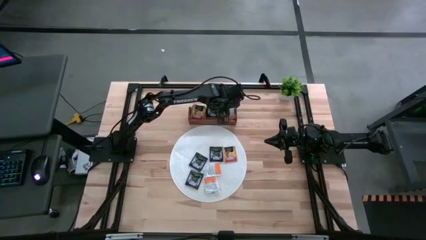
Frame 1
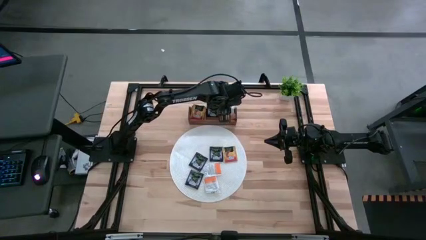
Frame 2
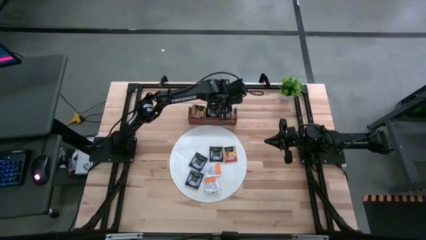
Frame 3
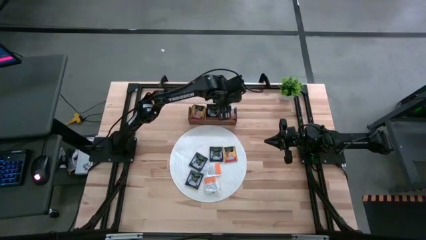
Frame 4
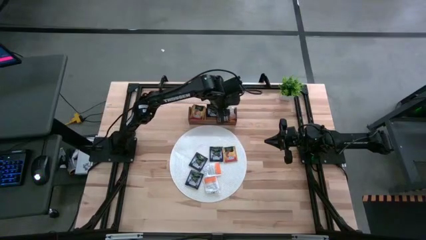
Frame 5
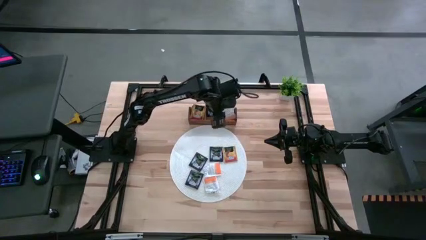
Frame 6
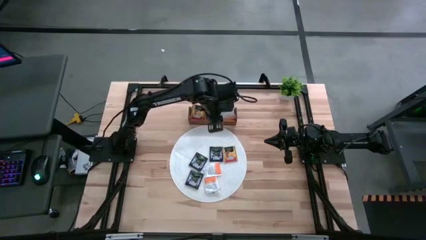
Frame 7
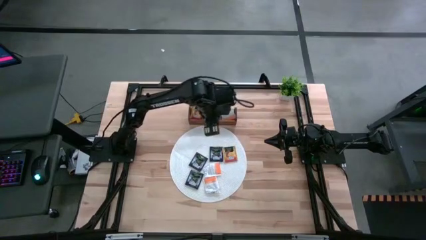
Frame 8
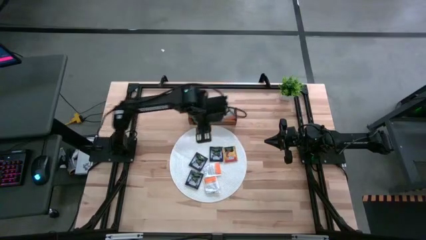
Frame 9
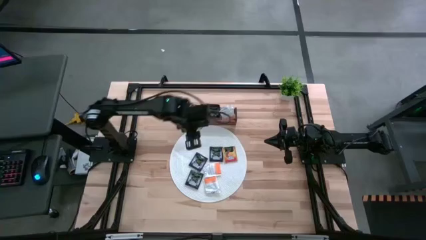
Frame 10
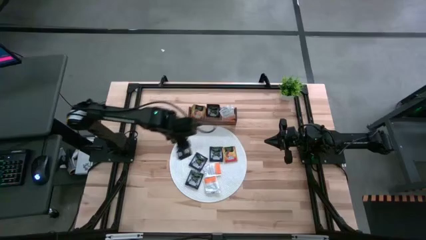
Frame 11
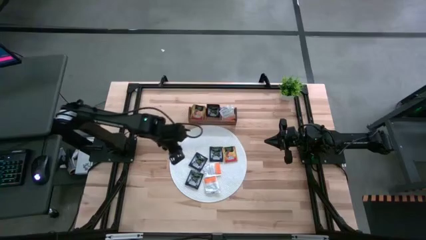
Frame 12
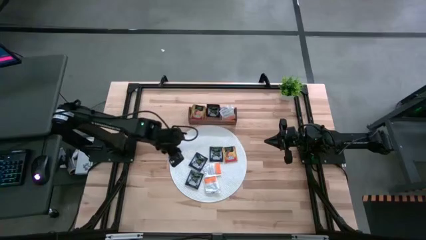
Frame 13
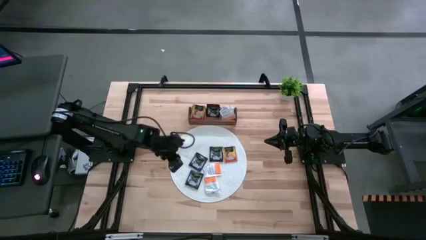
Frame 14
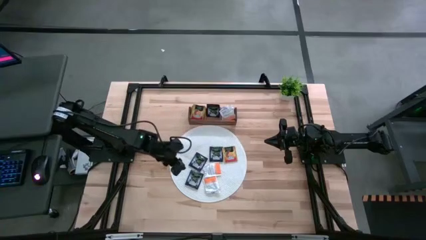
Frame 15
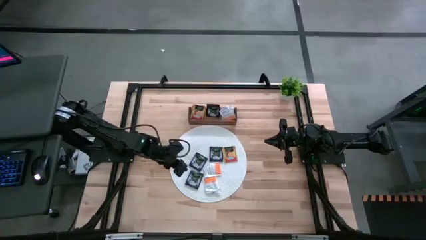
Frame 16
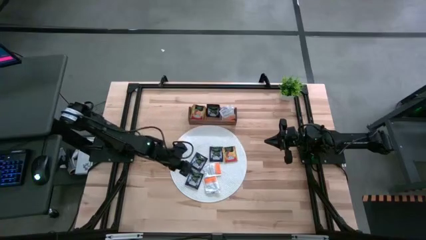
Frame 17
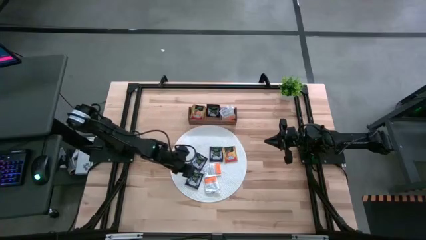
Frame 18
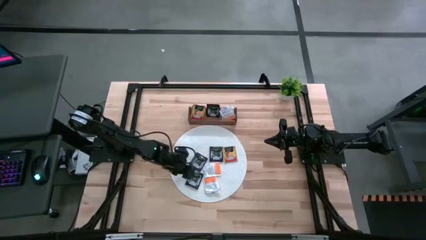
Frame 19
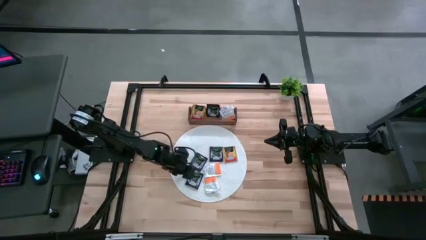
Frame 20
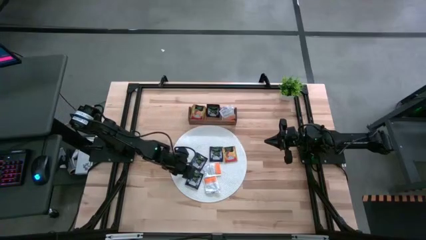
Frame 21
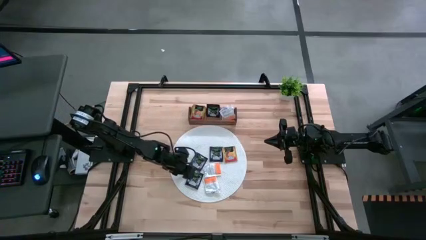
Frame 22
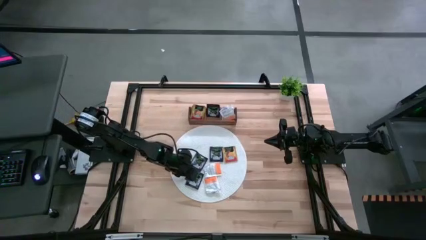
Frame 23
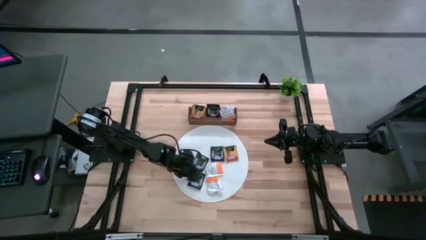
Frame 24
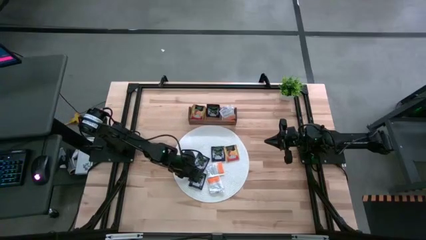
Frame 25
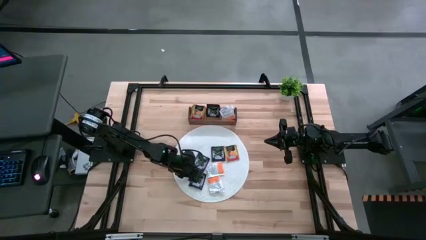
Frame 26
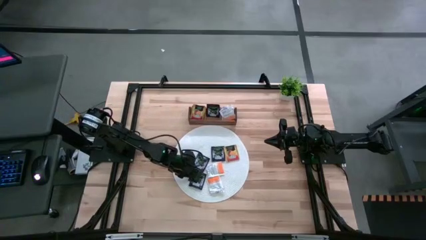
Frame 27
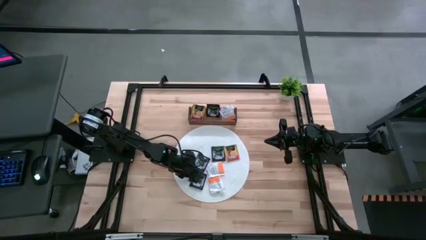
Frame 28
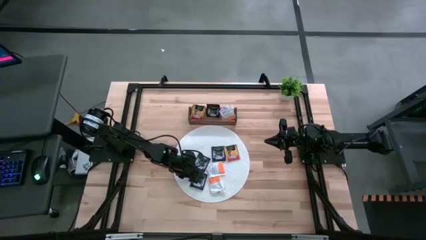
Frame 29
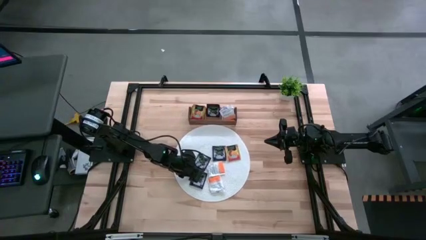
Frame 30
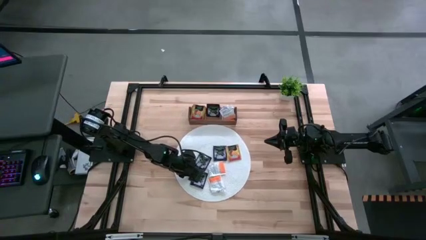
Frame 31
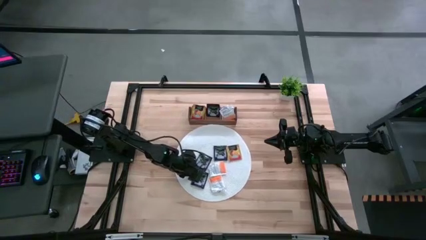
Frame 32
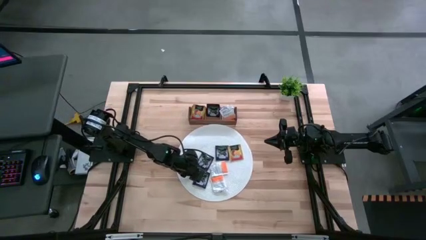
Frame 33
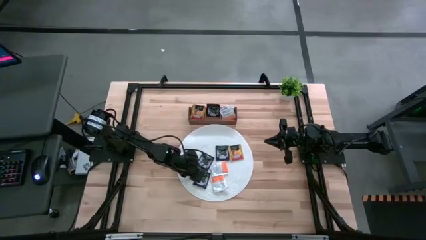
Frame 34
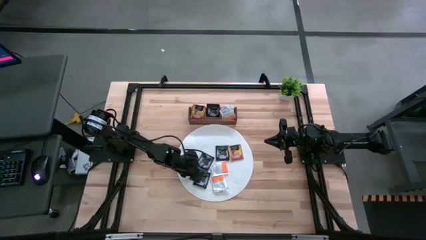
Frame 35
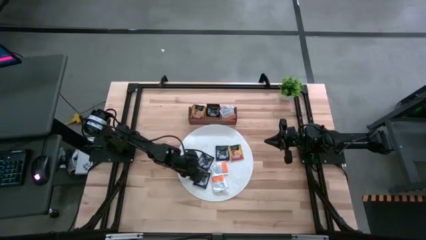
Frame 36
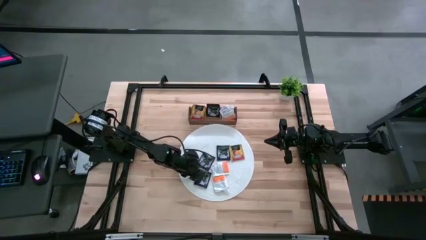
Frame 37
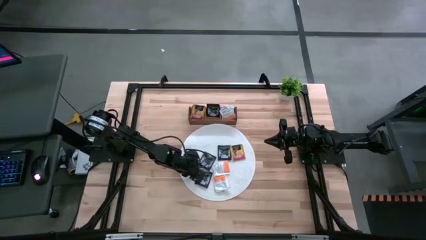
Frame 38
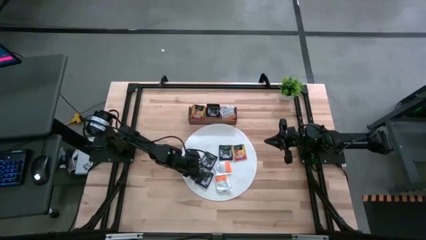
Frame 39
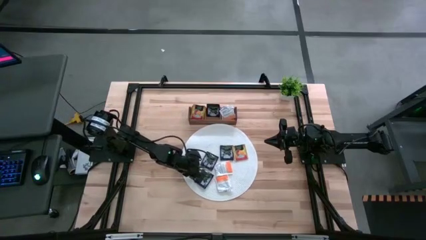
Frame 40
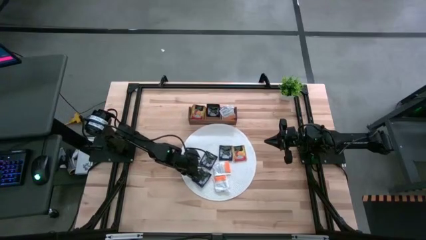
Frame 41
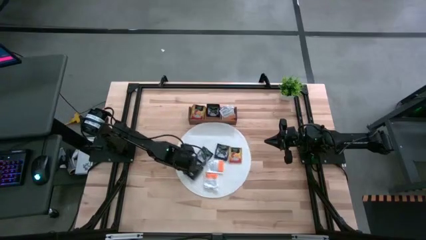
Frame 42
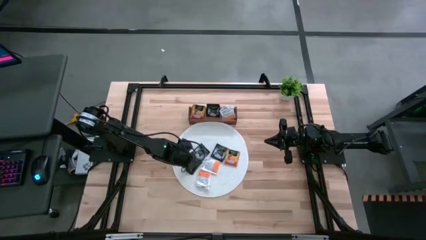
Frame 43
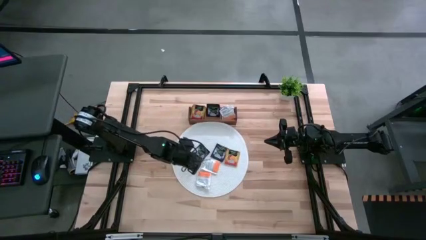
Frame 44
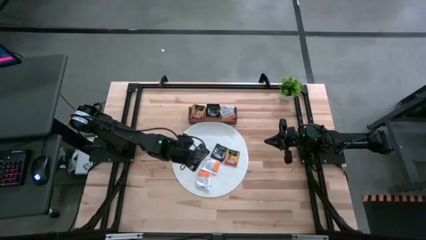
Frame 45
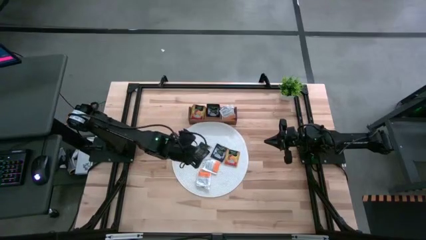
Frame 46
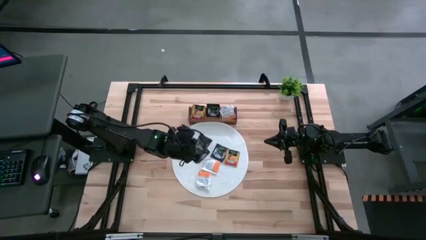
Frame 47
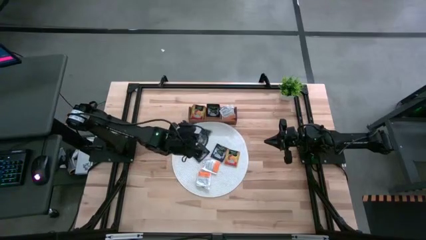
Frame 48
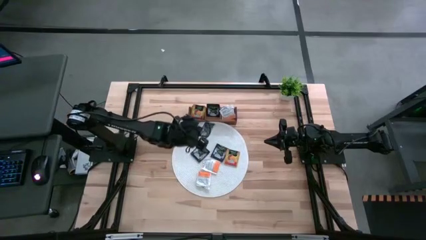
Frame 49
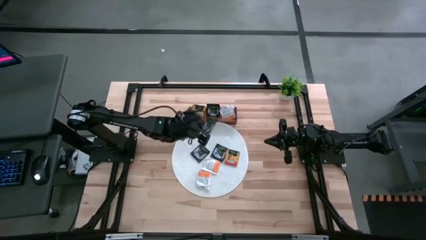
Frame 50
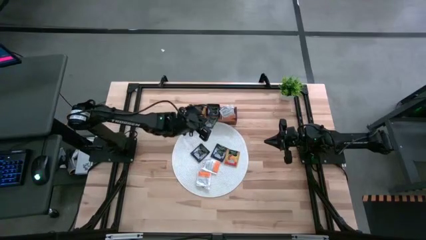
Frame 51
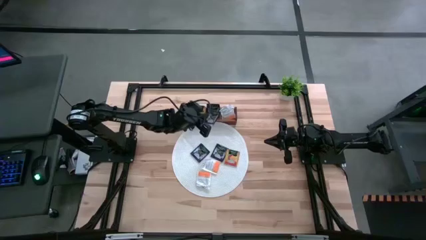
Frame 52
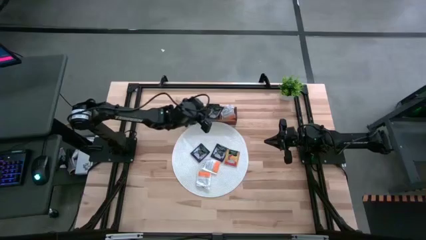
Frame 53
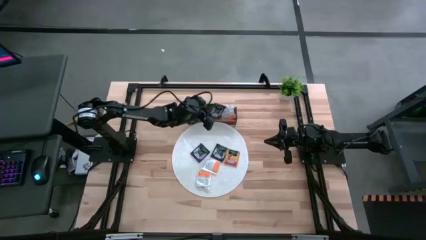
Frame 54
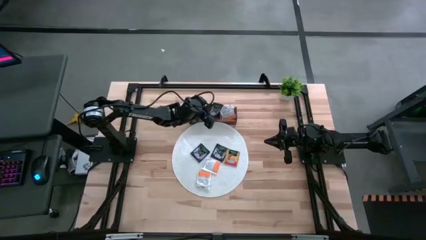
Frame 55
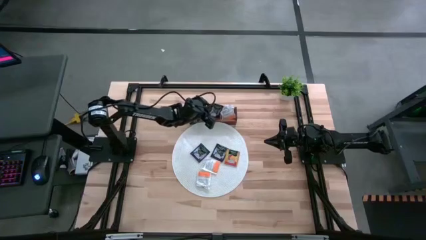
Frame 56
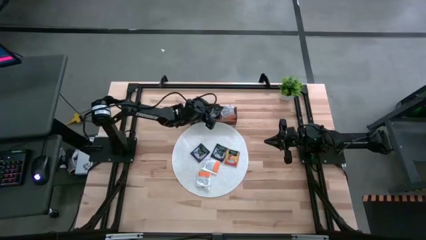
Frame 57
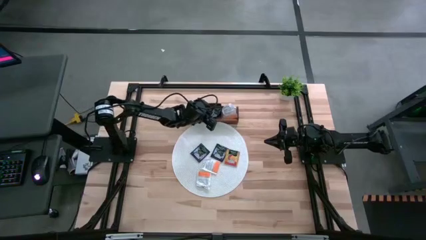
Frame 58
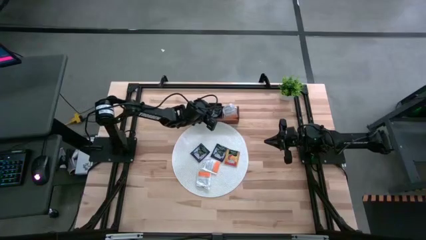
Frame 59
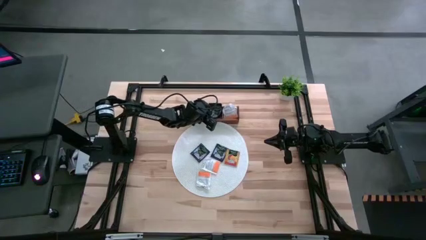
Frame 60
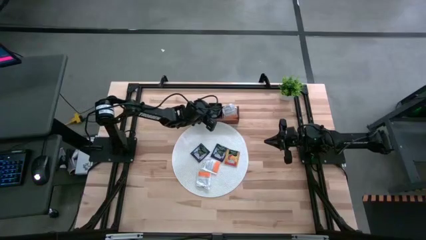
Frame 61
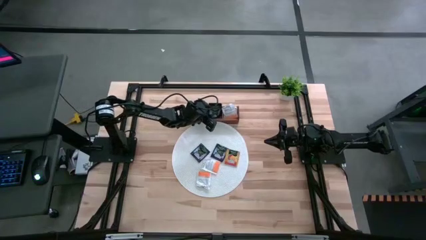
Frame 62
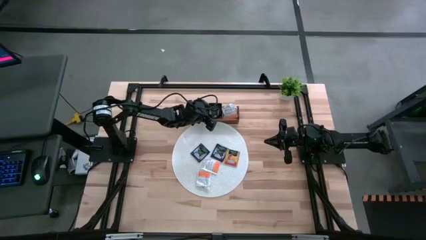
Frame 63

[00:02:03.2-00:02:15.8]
Task: Pick & Place Tea
Put the black tea bag into the middle section of the wooden organizer

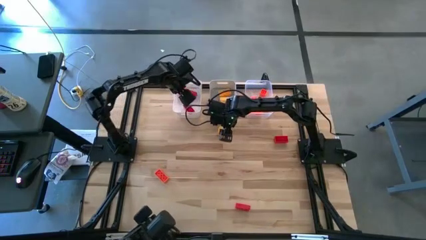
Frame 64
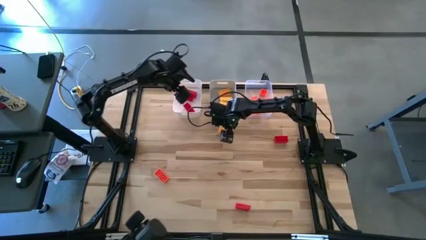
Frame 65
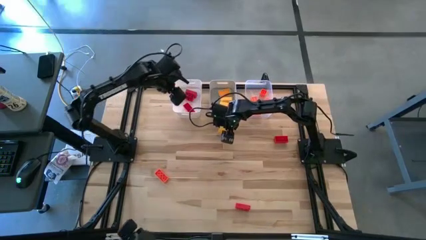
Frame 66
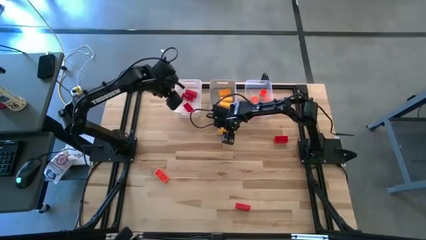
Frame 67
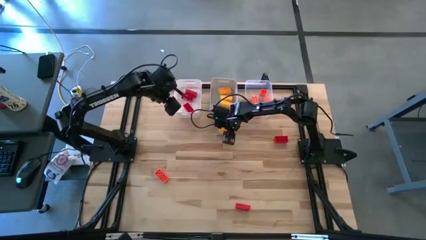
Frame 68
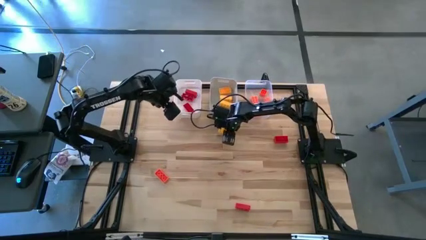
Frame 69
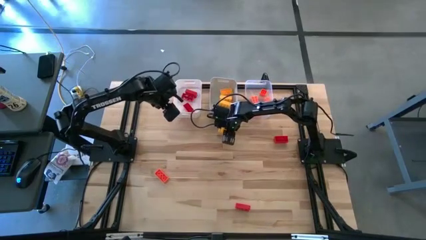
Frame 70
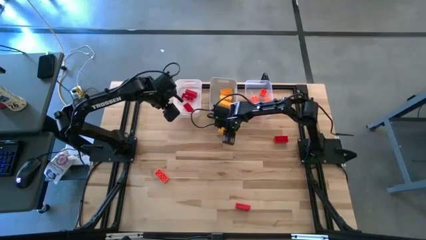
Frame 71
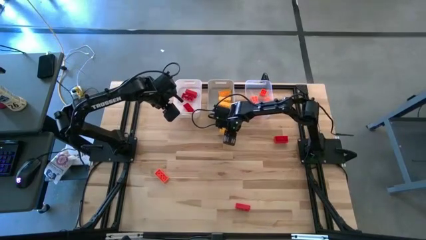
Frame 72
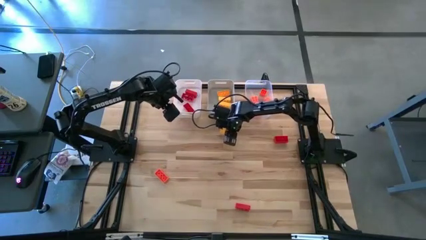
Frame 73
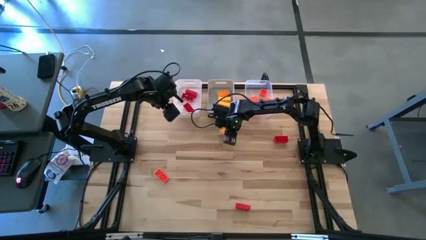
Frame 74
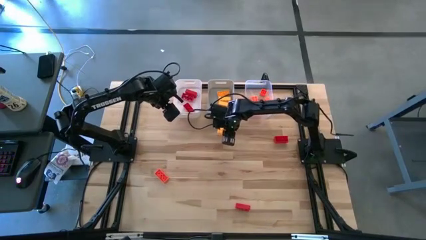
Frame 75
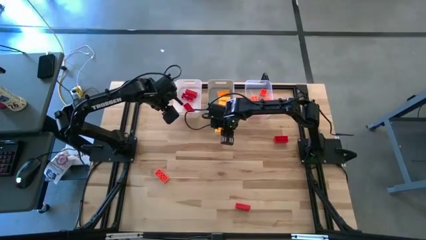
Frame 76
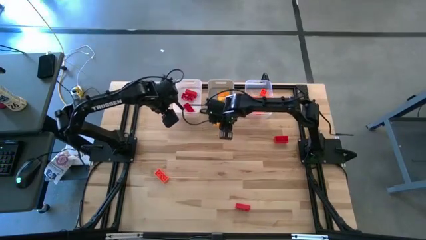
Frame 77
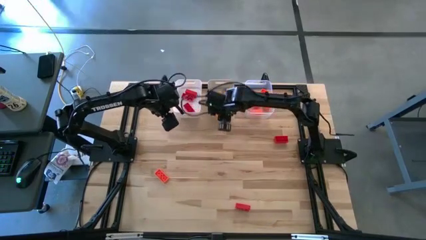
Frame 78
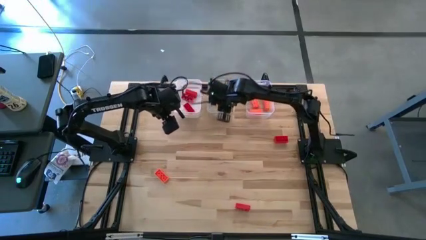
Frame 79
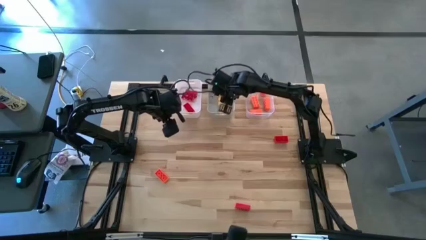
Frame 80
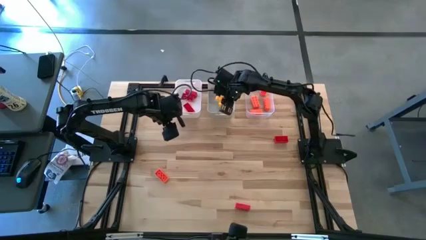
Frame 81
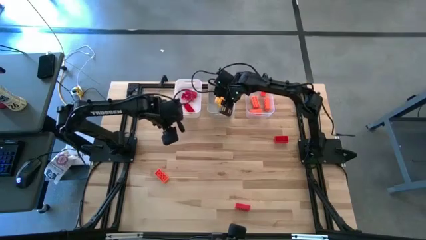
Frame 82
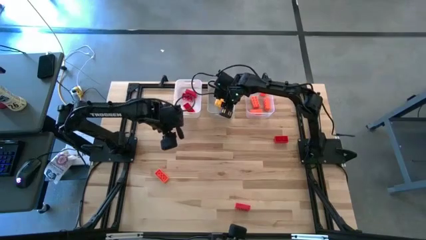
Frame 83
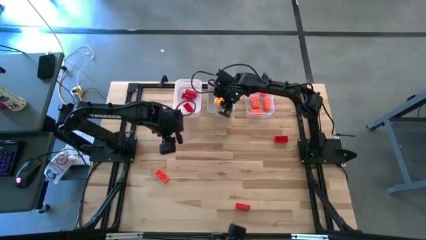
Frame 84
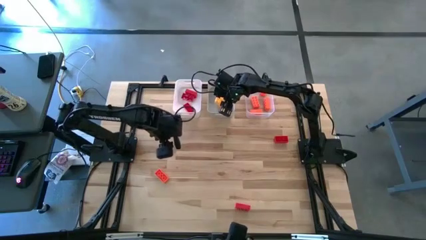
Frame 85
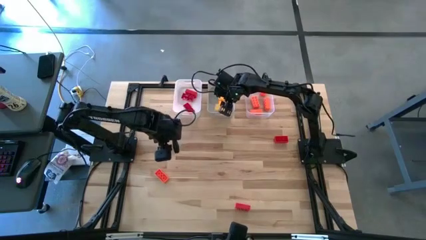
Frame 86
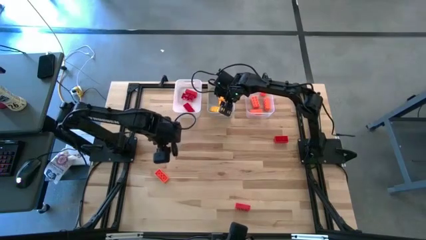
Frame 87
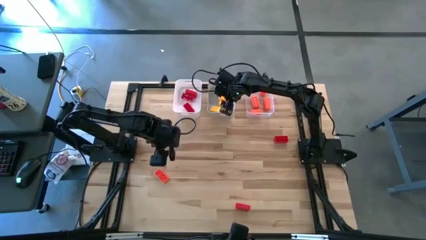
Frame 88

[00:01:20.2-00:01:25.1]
Task: Sort & place blocks by color
Put the yellow game piece into the gray bin
